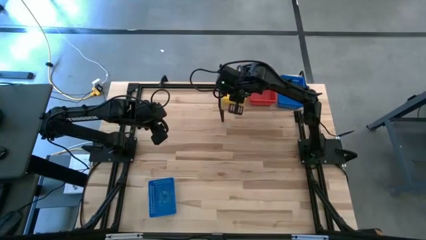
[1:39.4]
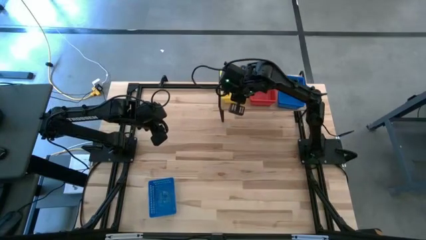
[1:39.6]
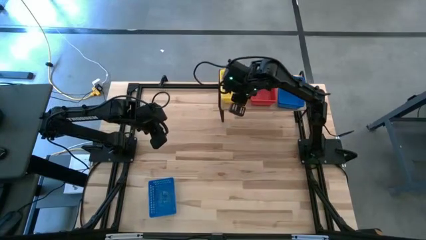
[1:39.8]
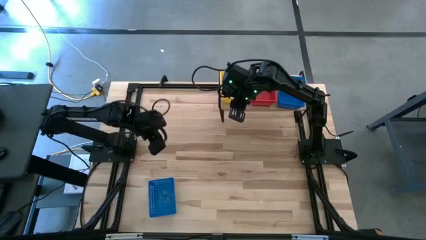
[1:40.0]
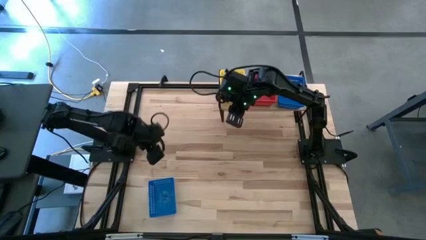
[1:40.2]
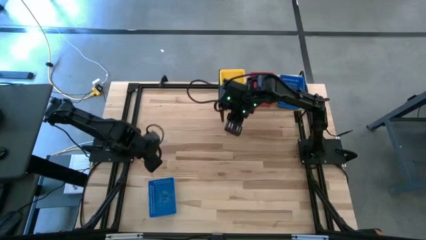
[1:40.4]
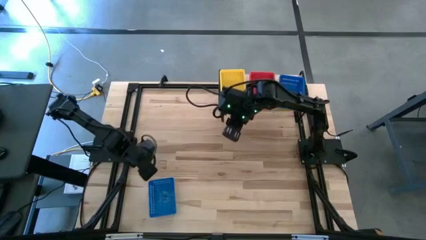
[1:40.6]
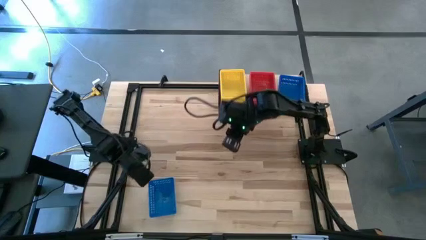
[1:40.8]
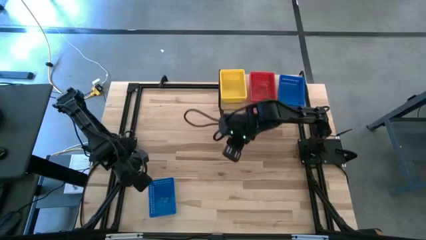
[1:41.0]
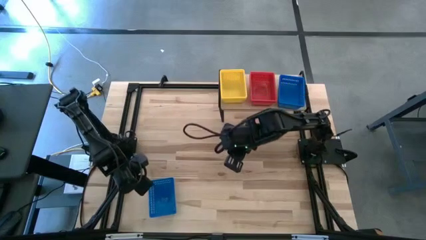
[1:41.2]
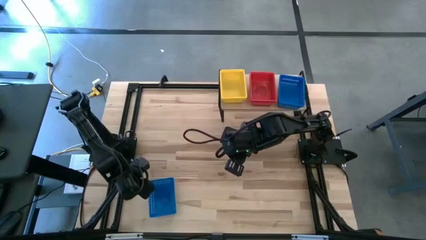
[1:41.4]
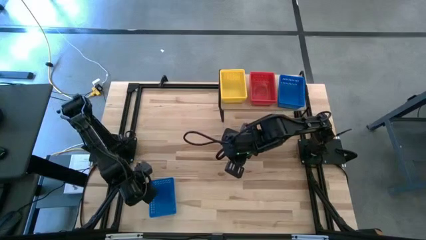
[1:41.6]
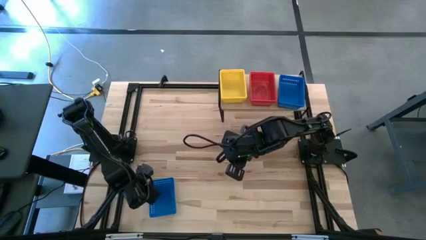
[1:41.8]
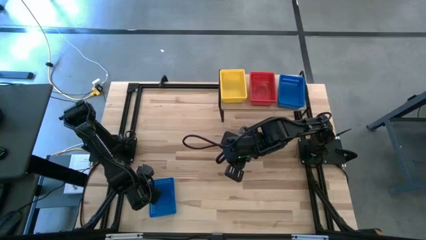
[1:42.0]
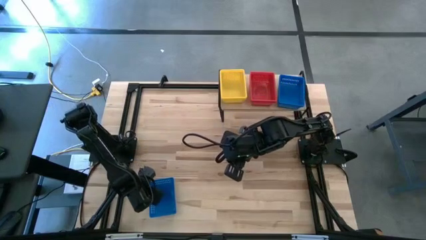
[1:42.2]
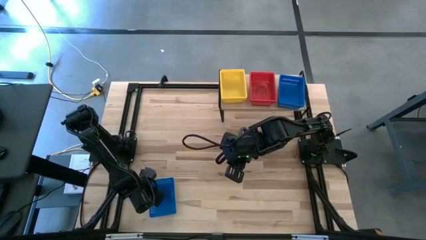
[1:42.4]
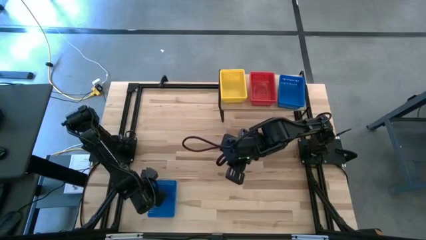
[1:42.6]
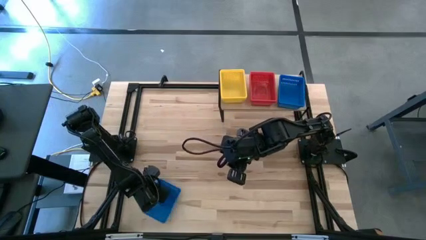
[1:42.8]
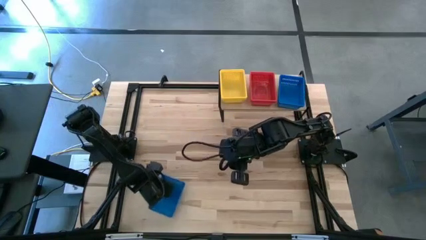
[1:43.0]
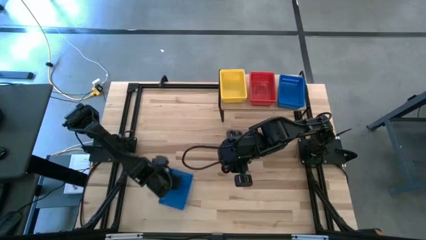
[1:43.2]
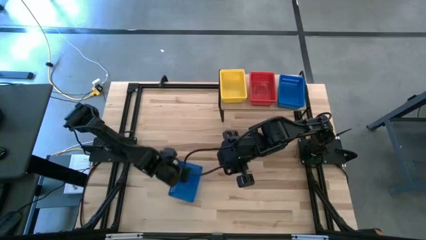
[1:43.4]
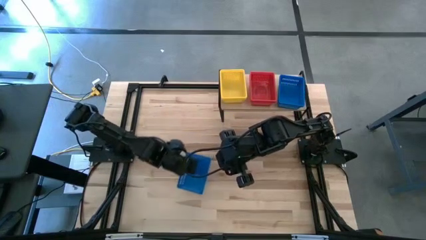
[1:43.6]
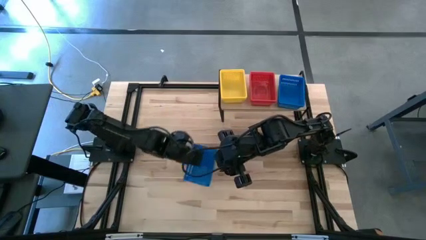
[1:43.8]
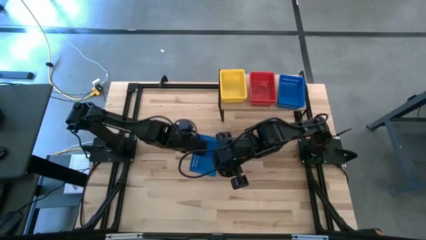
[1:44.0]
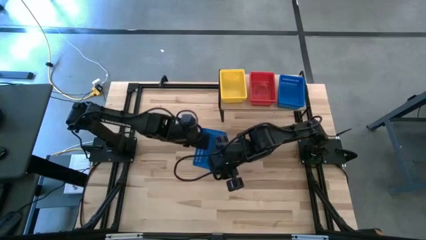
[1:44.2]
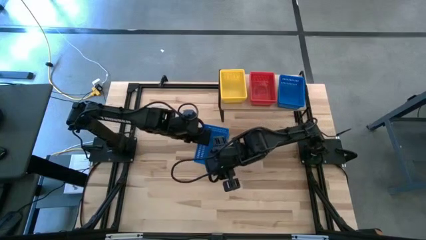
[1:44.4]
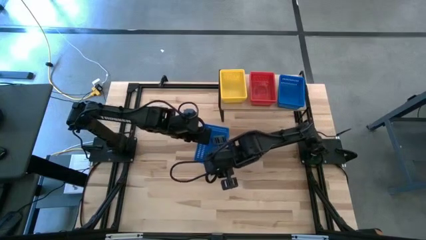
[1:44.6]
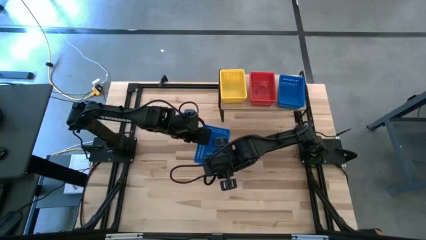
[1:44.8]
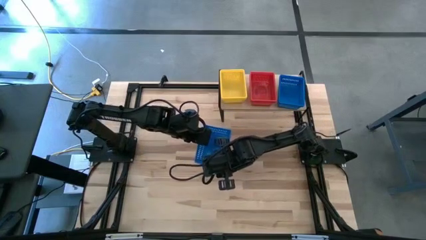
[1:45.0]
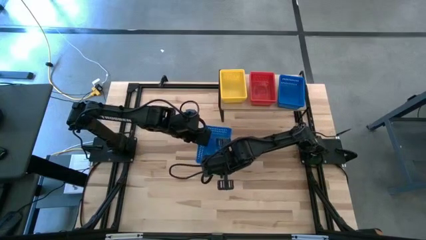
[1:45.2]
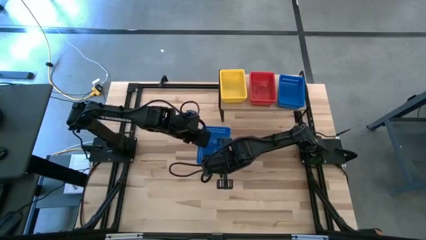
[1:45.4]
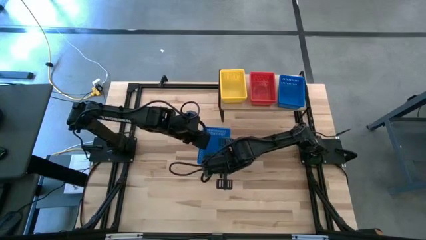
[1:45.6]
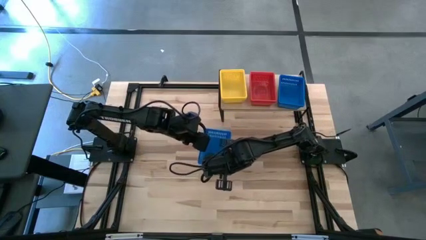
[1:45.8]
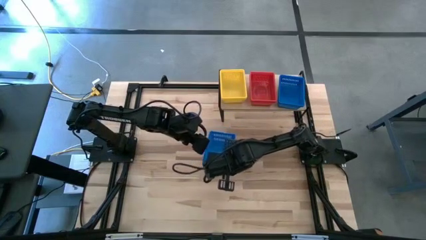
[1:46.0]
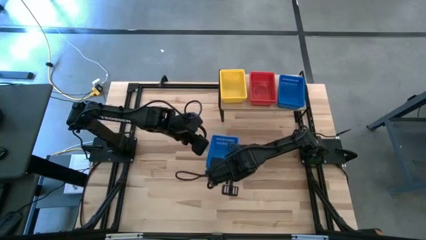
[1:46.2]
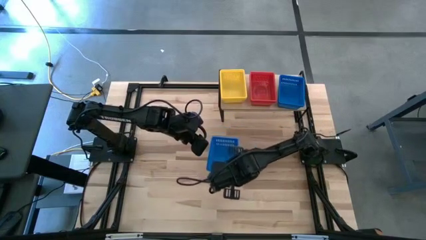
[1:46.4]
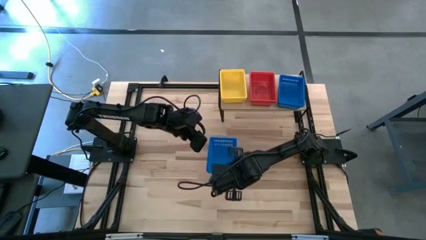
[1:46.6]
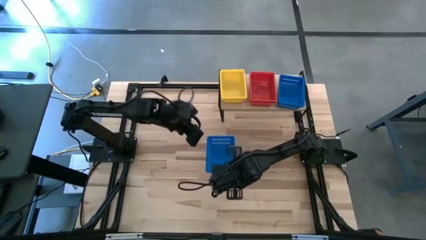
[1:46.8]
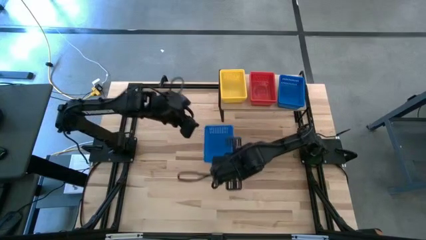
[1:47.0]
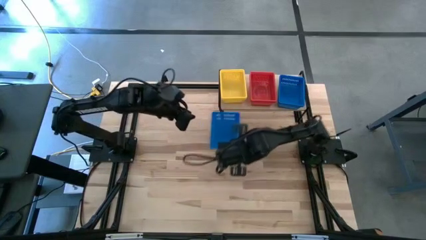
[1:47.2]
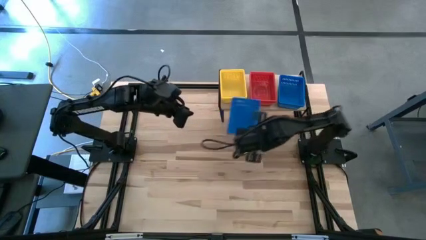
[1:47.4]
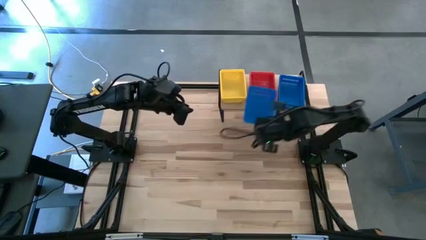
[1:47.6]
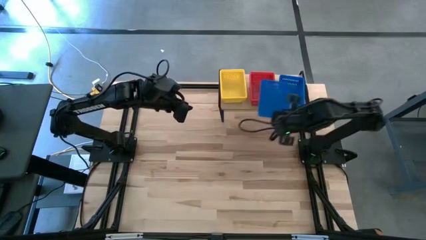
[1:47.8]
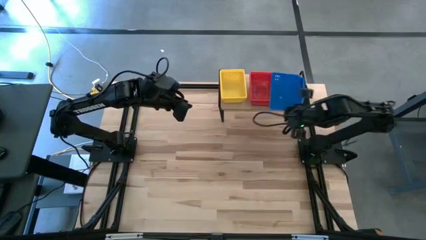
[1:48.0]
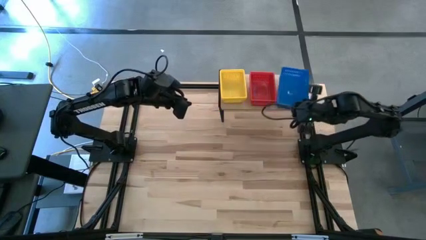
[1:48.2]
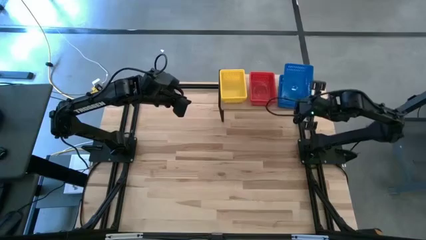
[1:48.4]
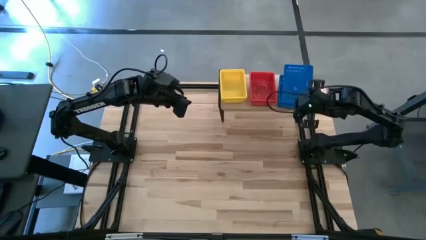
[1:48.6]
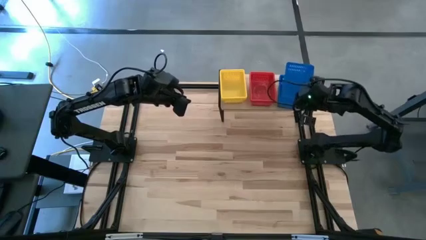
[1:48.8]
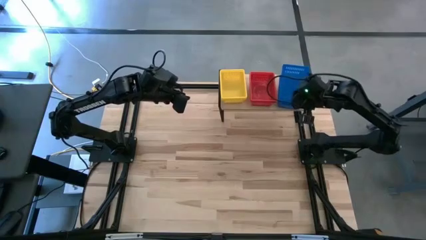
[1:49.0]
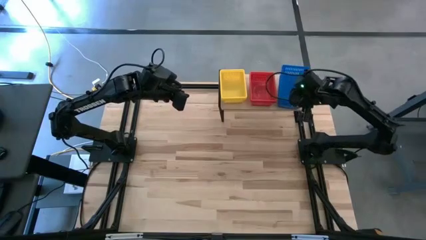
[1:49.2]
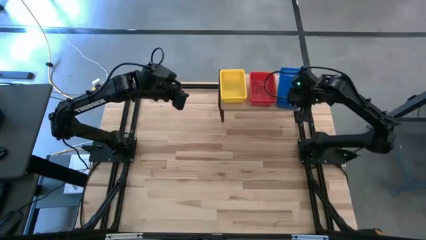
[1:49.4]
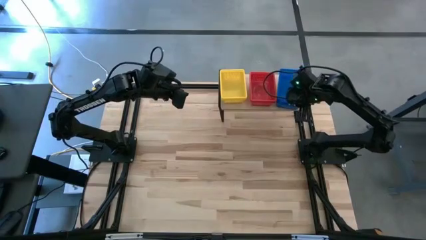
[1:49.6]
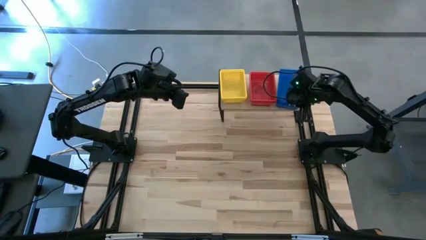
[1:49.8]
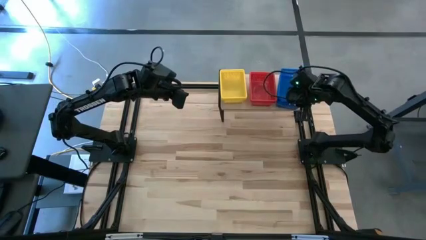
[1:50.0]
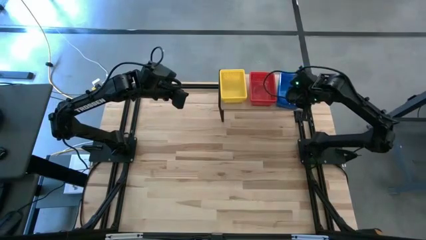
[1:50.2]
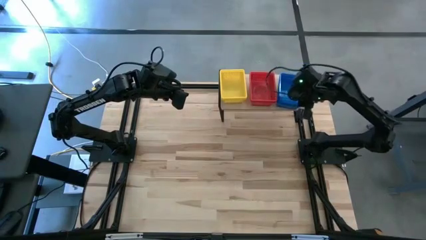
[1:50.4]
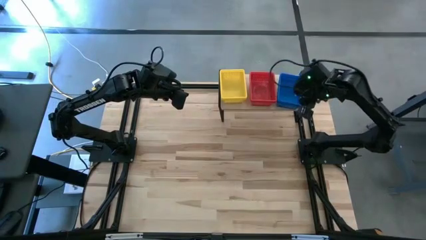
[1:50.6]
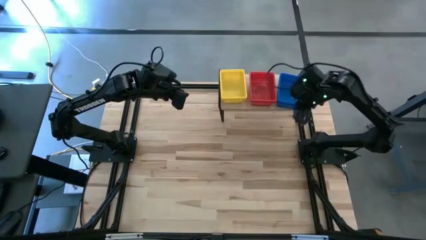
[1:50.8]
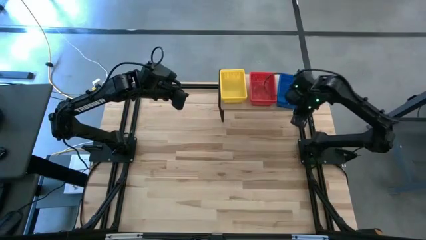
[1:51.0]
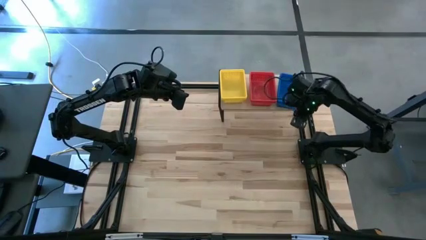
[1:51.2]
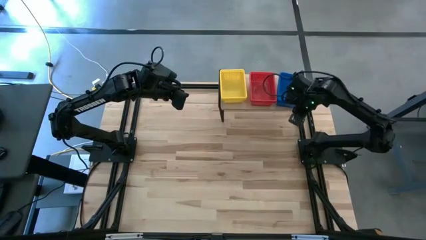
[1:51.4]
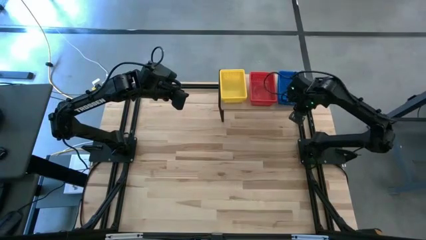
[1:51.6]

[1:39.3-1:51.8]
Task: Stack baskets on shelf by color
Stack the blue basket on the stacked blue baskets on the shelf

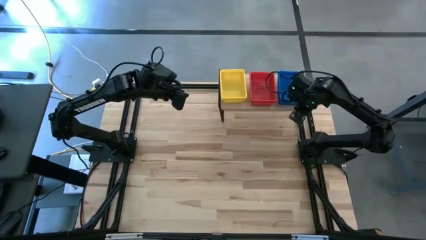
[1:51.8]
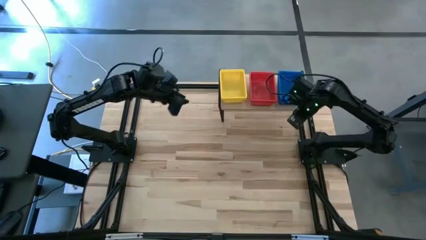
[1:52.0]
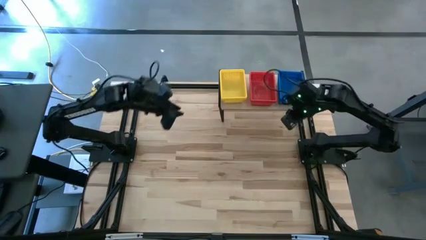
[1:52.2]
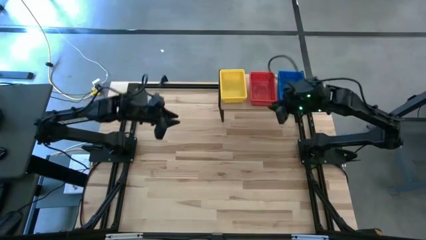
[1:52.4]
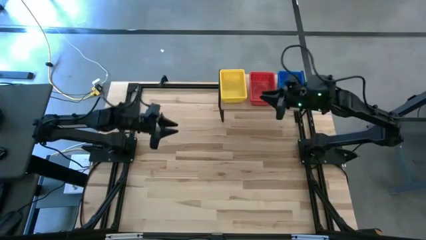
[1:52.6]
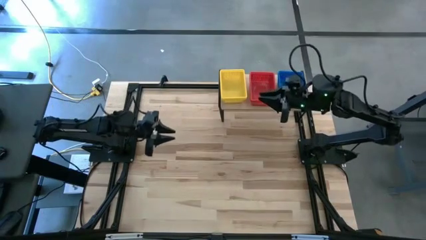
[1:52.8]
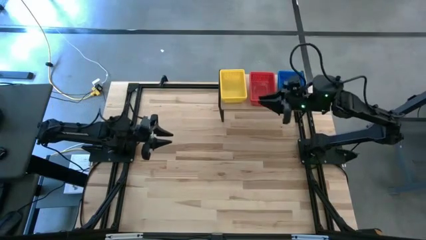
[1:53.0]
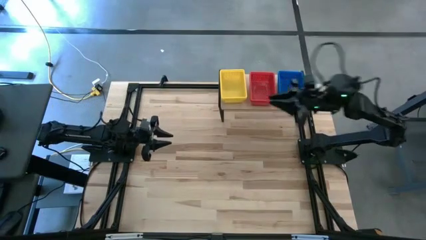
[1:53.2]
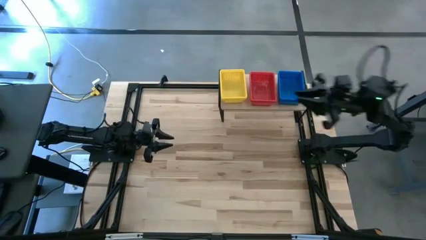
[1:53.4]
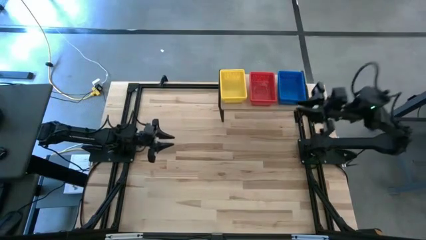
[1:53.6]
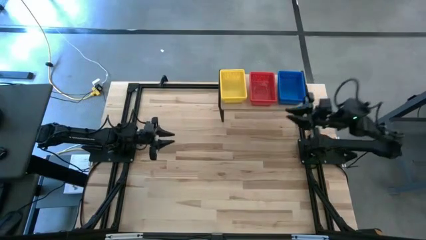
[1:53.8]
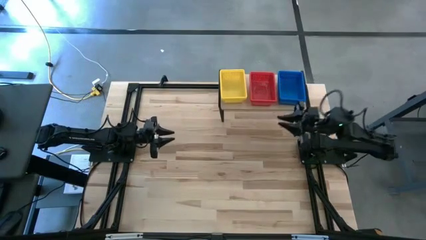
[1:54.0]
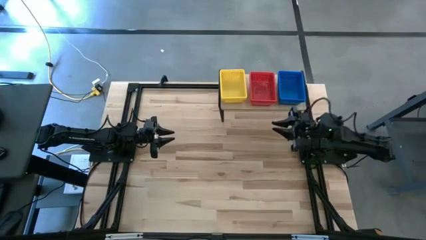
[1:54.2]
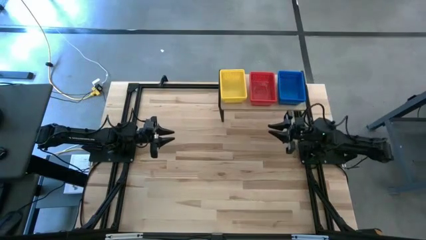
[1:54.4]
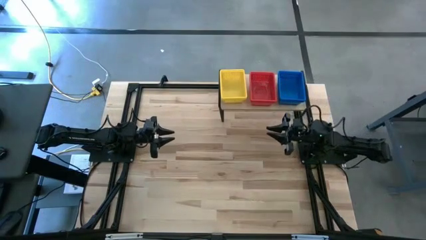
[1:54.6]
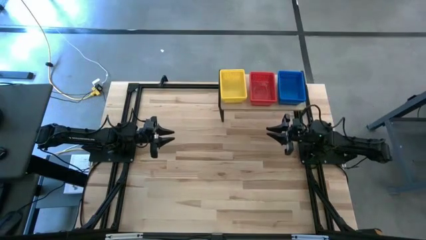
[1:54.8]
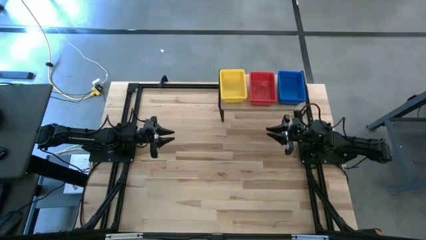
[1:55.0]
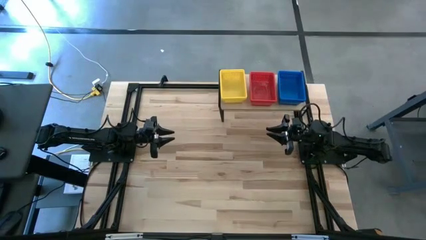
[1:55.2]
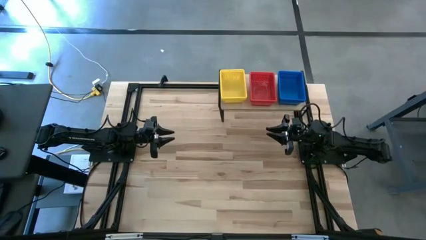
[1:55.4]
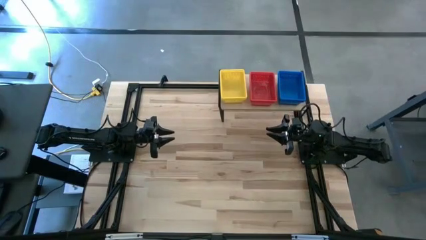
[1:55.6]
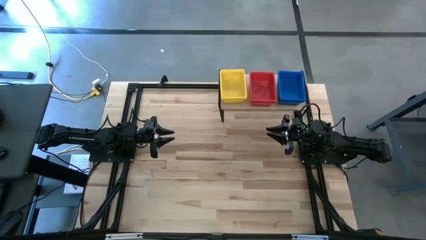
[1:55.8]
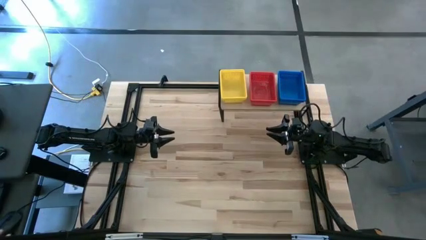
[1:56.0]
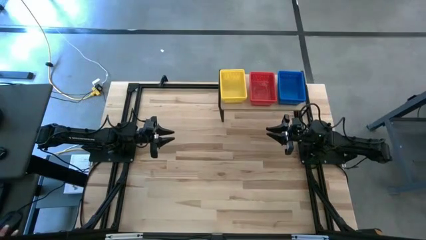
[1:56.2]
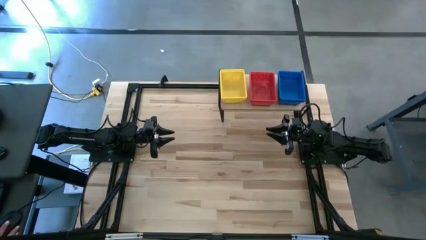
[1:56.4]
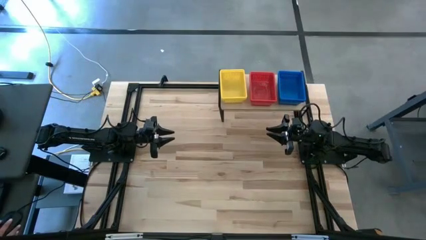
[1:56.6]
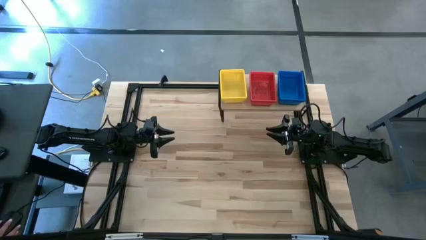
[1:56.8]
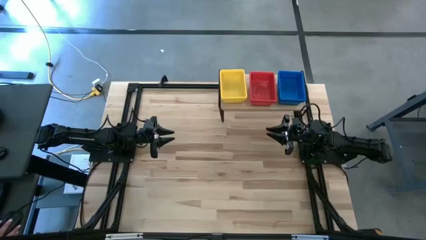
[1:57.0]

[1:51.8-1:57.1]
Return to Home Position
